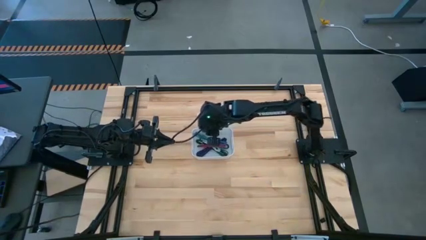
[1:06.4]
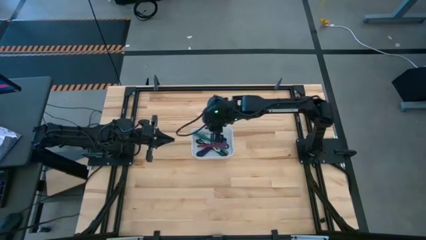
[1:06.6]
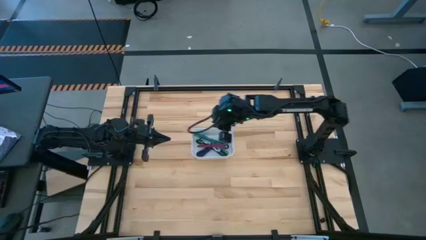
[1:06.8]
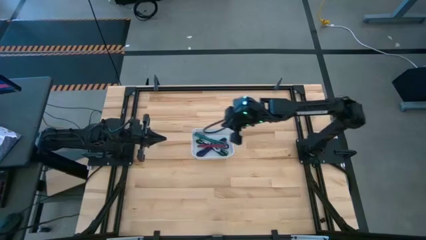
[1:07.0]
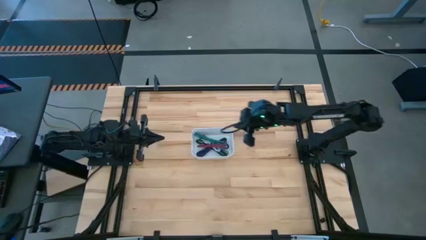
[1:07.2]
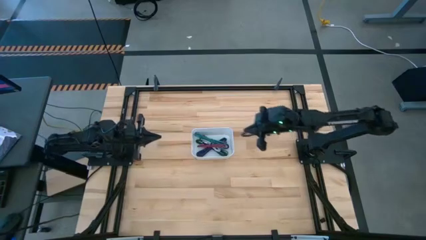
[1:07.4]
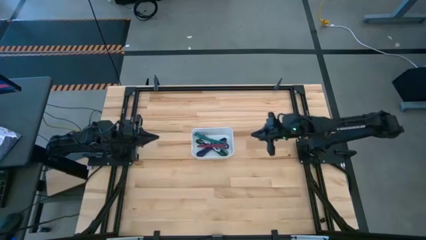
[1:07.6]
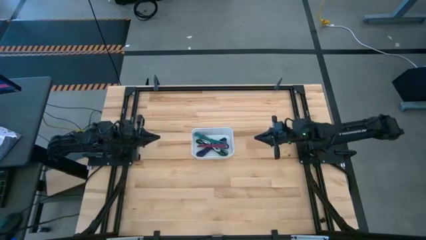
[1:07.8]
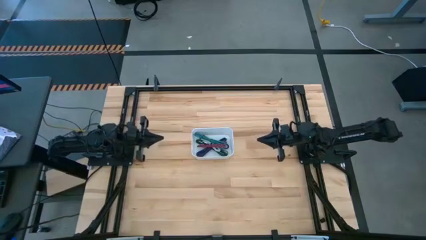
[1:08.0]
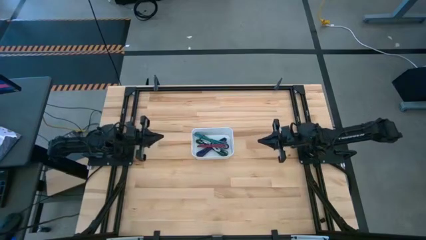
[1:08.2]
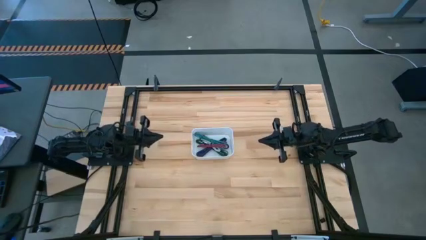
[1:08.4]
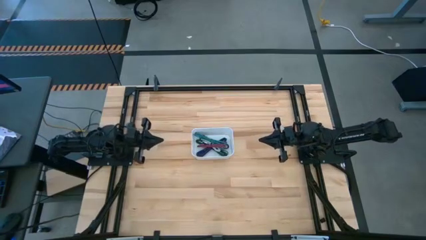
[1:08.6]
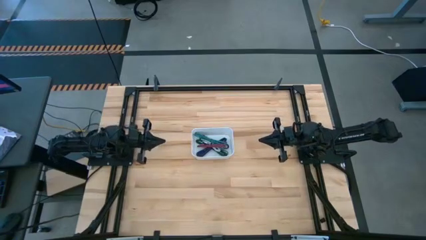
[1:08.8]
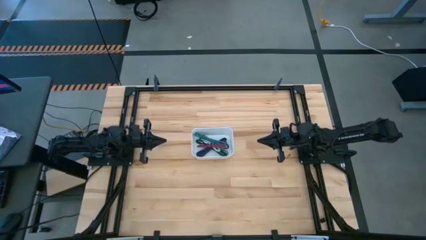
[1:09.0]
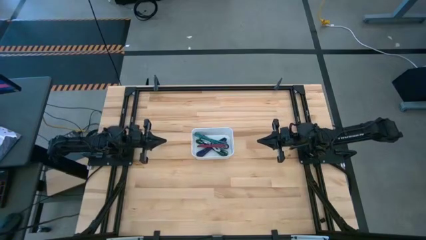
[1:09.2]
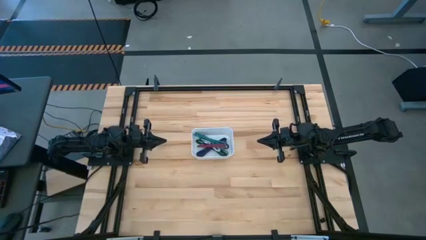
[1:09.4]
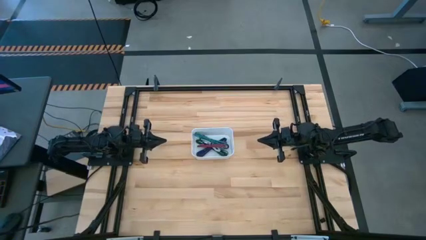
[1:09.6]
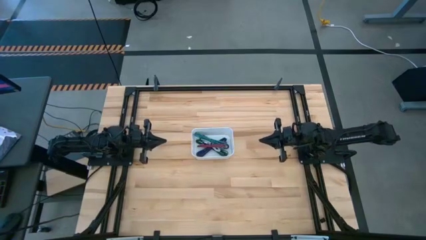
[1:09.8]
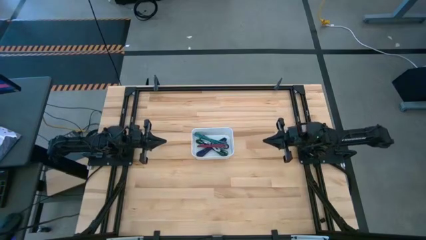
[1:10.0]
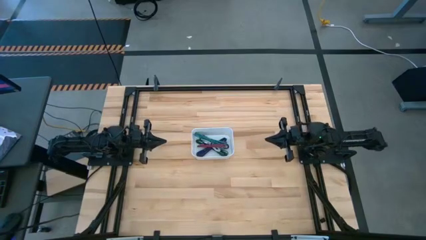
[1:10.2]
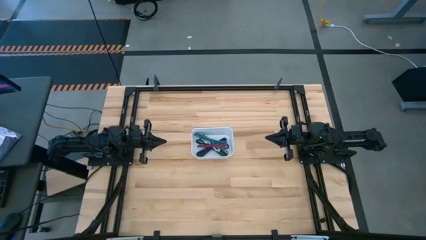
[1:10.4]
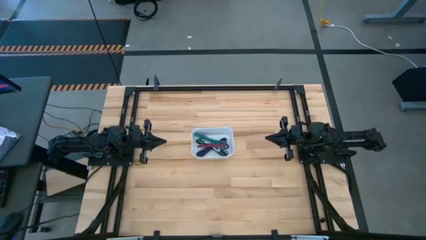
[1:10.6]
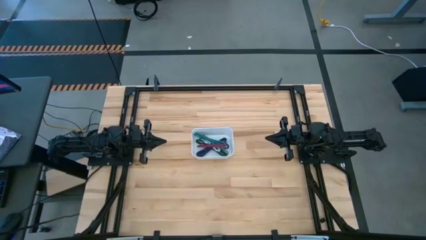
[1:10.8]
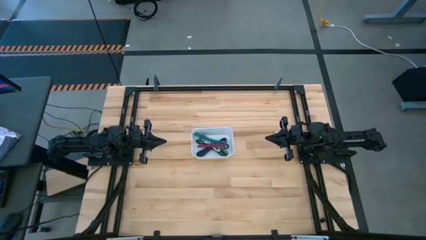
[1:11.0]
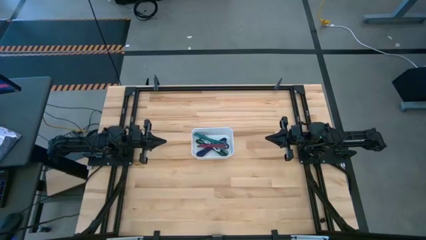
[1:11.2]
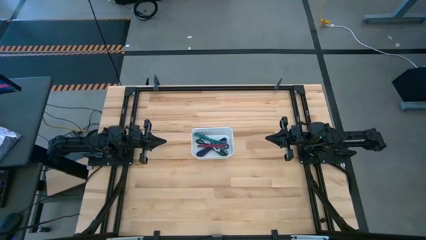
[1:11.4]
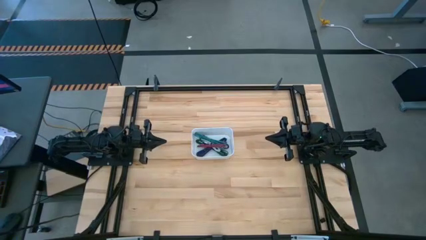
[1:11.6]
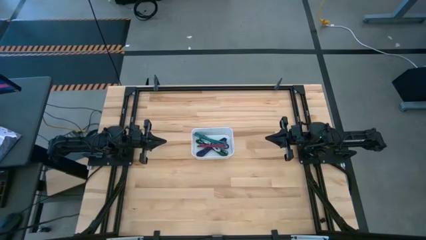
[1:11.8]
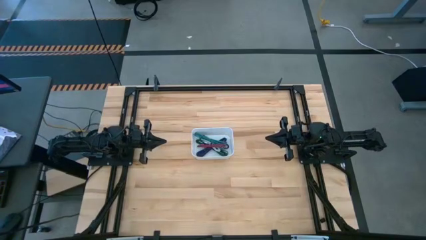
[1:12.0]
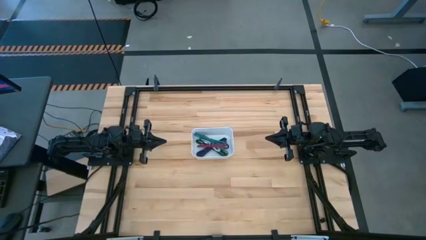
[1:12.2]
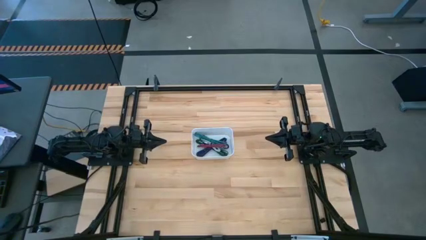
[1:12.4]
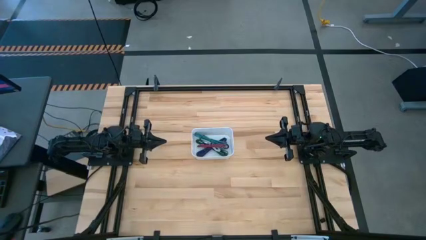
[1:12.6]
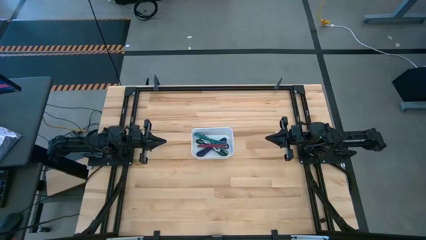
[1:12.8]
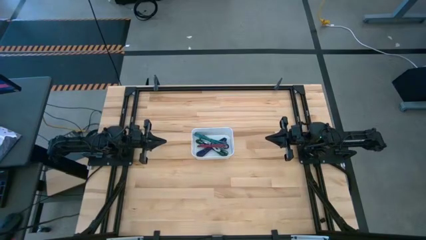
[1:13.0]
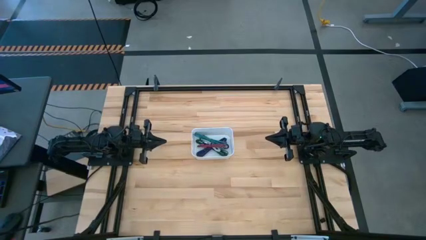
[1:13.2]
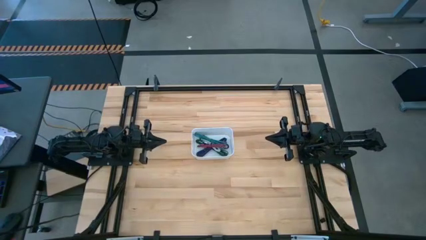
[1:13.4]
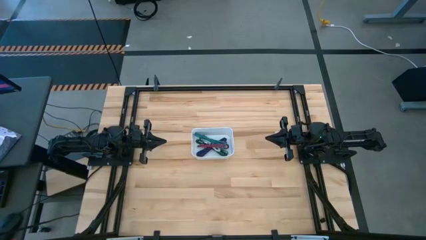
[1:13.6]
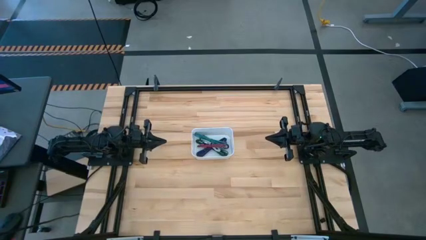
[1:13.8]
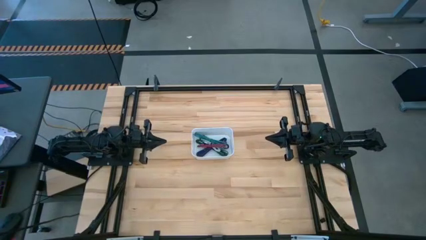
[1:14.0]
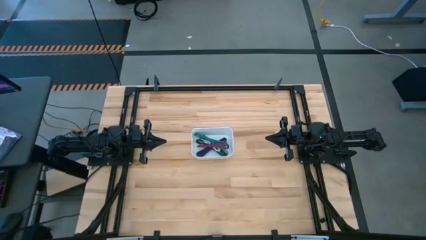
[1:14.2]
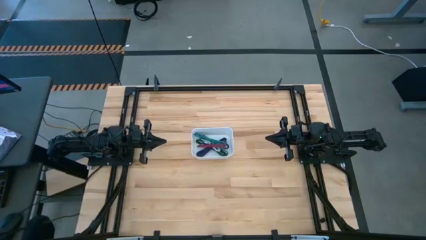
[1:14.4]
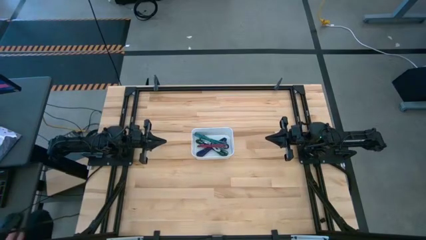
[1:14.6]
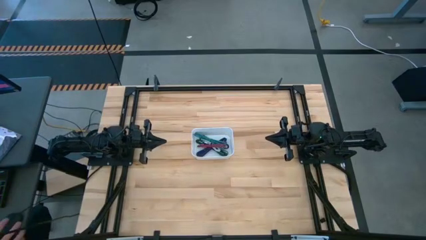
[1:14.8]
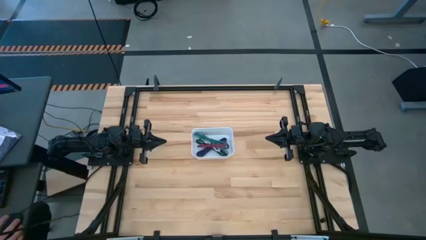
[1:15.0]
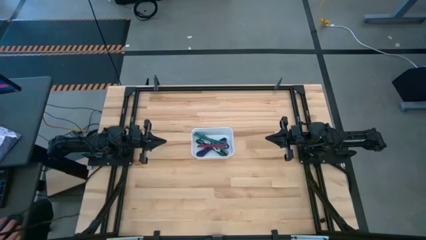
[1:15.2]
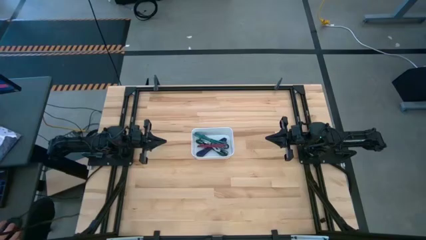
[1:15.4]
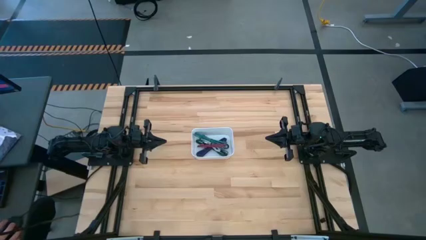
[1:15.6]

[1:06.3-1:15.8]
Task: Pick and place USB-C Cables
Return to Home Position

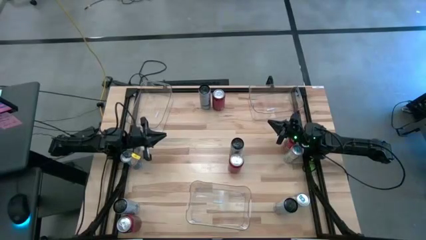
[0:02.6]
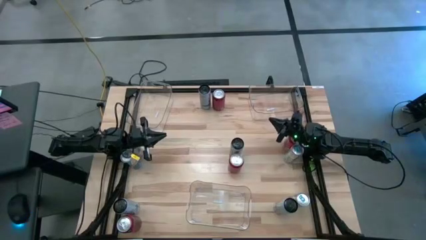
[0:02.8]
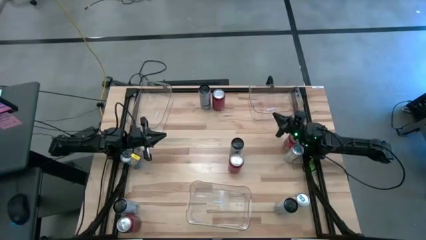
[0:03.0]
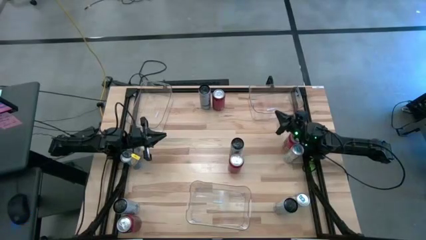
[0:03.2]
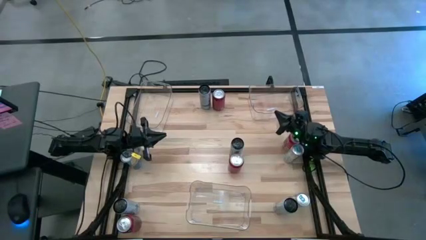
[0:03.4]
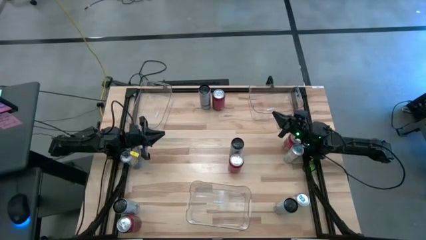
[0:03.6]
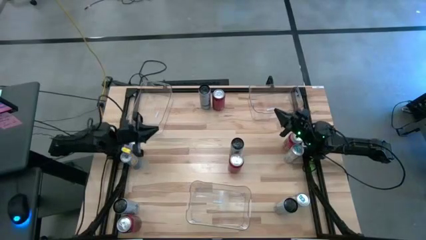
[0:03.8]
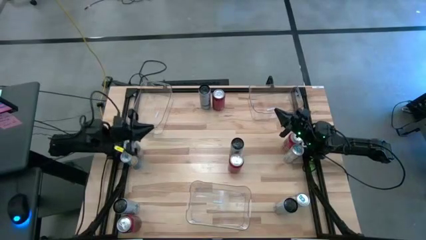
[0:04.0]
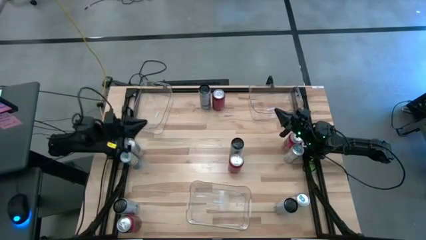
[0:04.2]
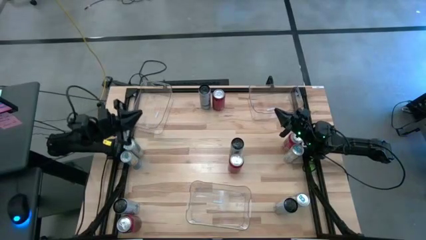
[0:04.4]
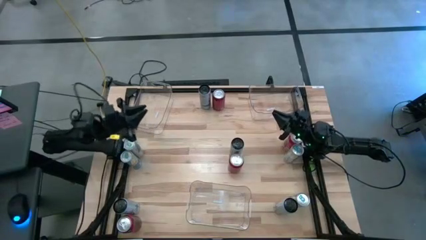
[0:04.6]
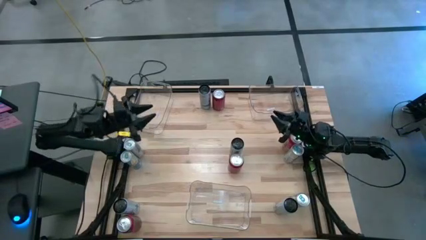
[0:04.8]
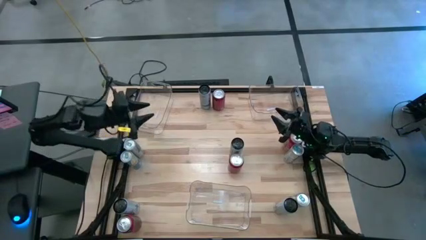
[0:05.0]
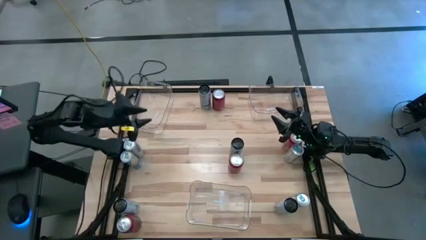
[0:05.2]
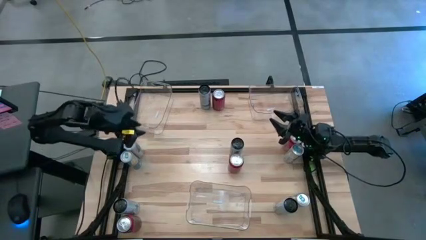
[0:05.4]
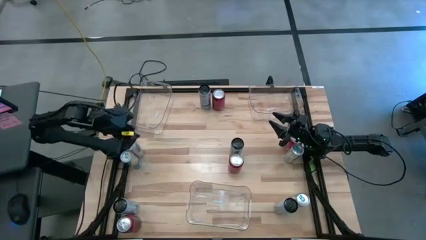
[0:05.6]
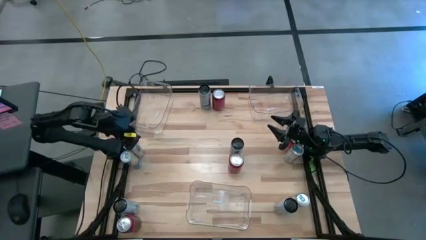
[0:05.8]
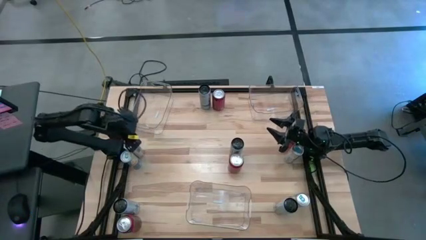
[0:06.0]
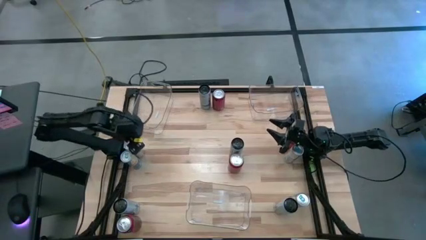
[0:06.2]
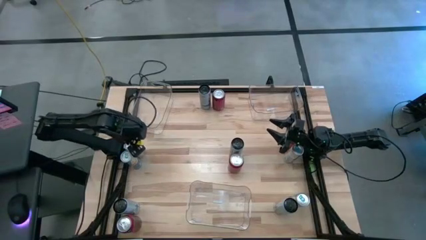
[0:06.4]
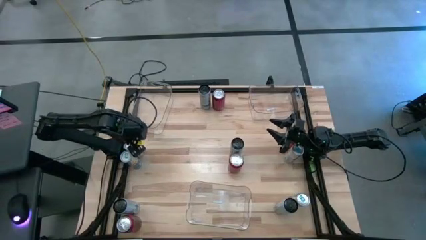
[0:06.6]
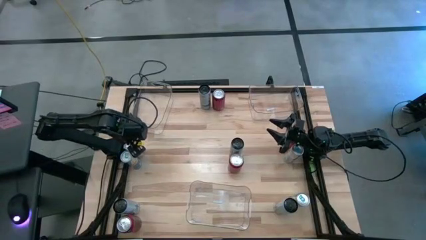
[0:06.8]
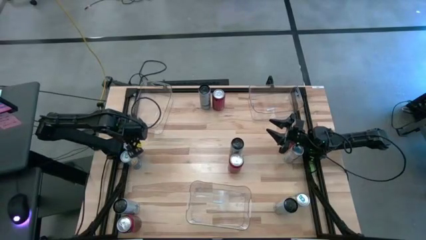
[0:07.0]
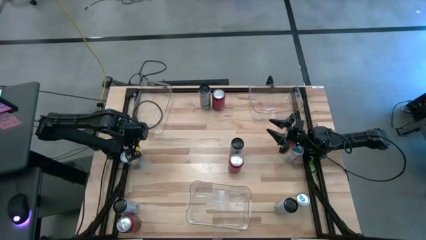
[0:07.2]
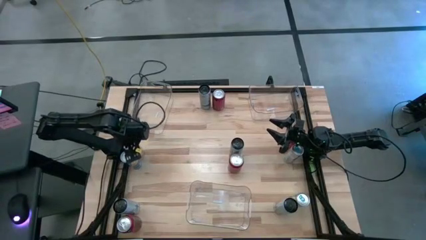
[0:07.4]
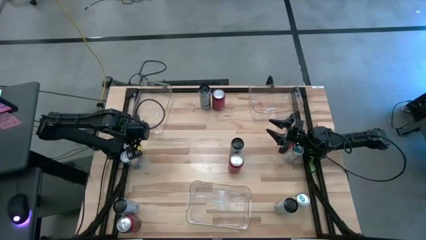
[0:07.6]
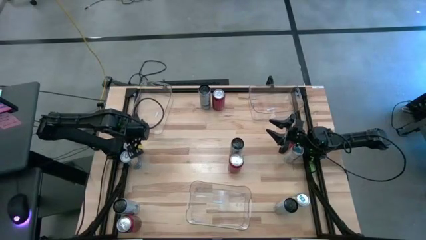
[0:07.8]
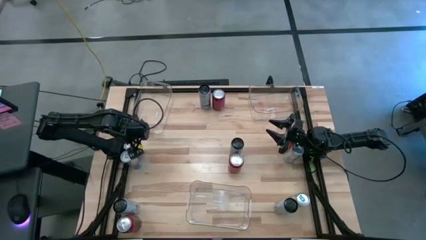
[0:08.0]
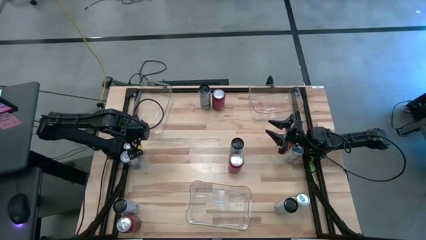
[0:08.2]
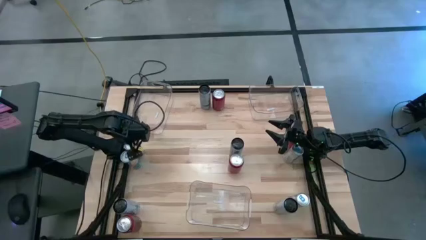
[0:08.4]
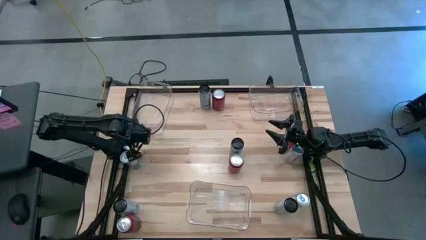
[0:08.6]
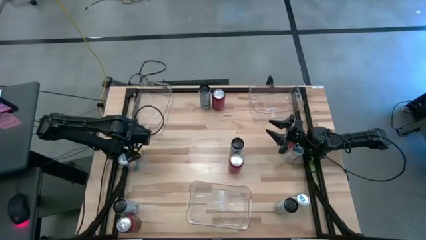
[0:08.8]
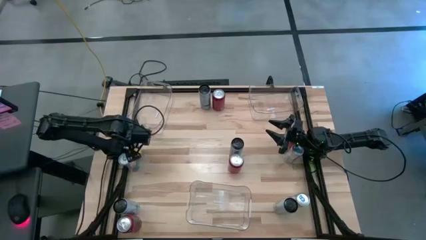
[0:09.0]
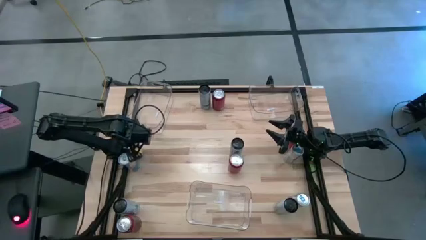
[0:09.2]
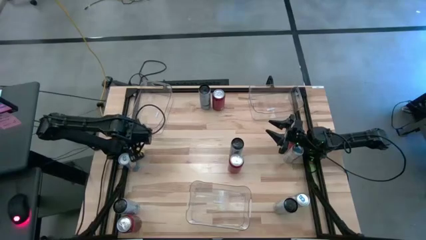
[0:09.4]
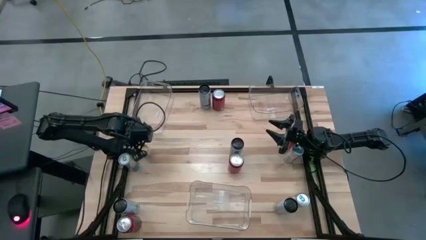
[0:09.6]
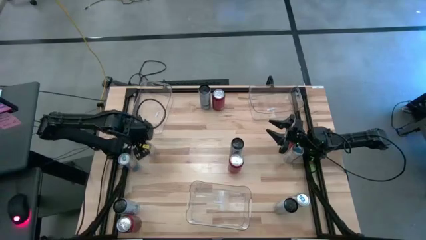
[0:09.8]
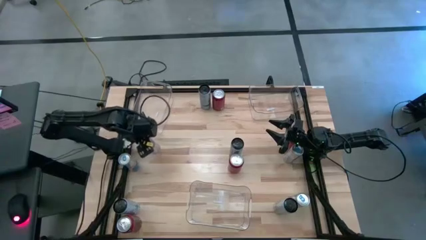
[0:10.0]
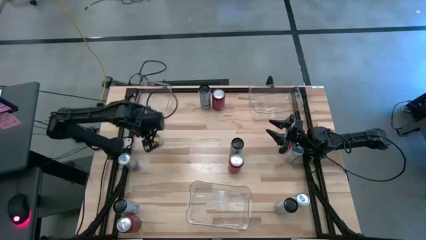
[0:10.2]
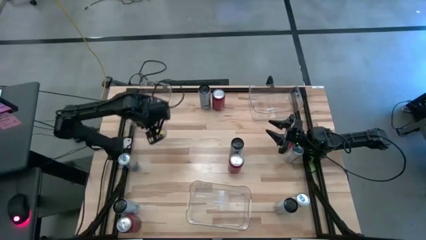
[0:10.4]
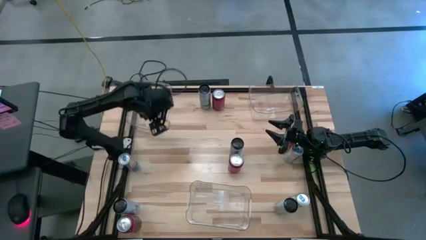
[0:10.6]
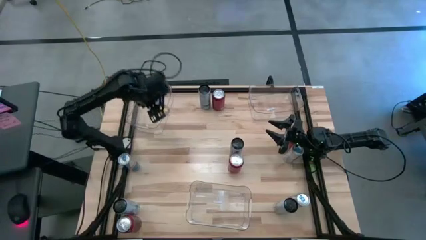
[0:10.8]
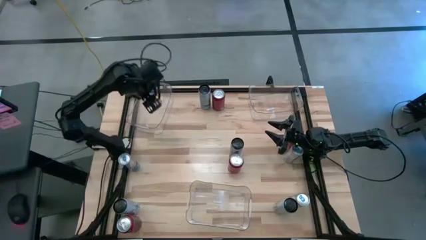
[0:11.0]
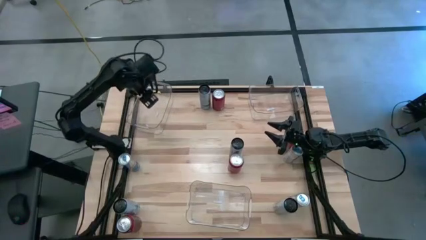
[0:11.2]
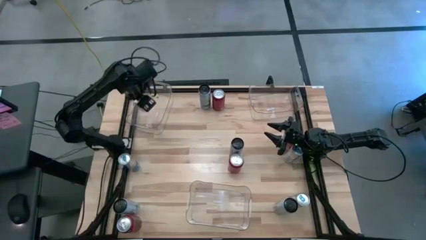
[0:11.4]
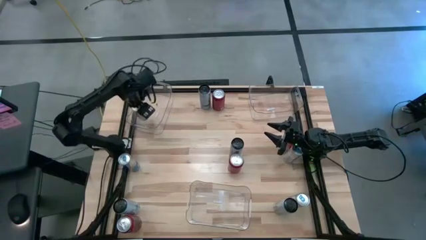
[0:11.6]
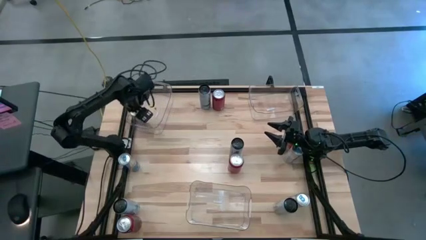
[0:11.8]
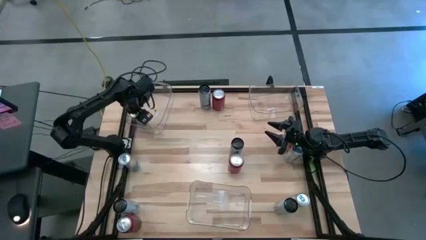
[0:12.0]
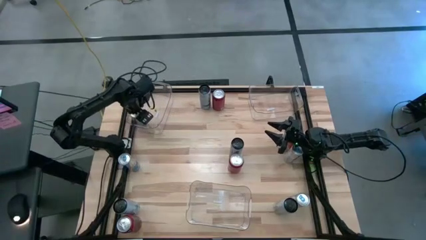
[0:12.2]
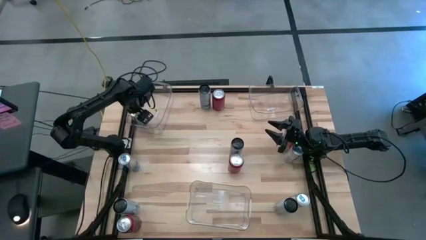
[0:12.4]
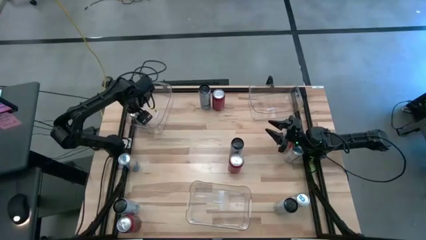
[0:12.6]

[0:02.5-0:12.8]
Task: Sort soda cans
Put the blue soda can into the top left transparent bin
